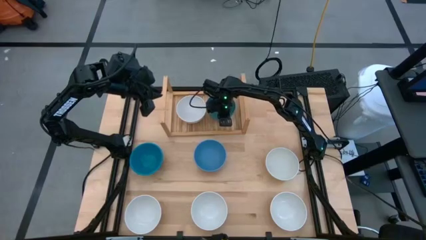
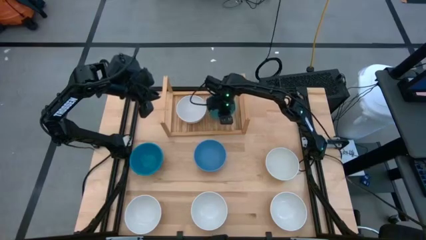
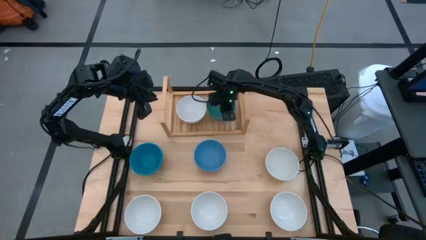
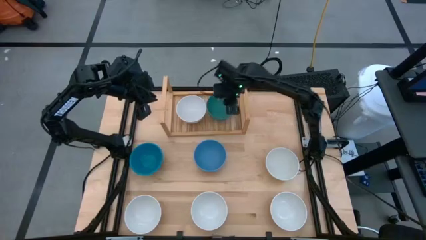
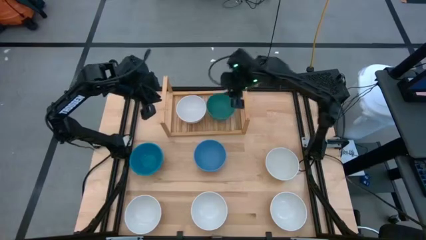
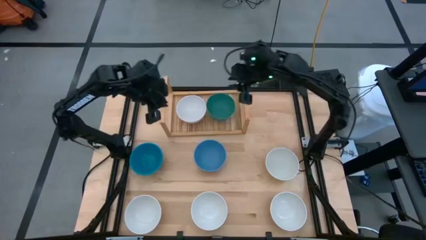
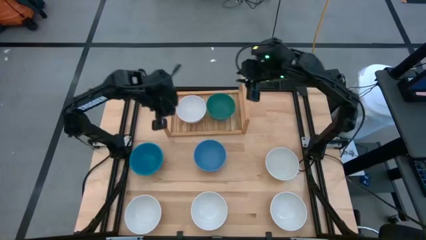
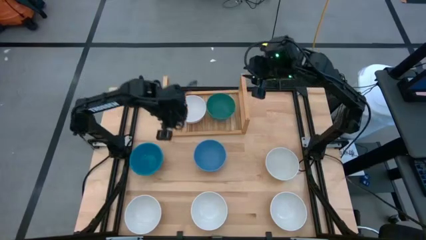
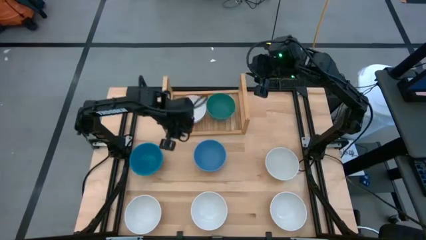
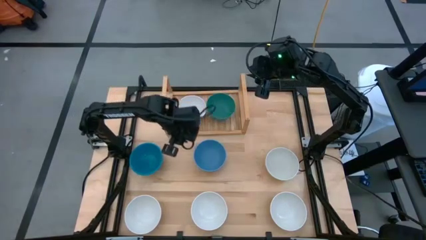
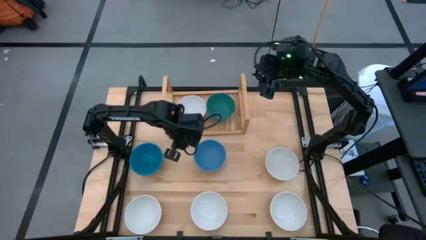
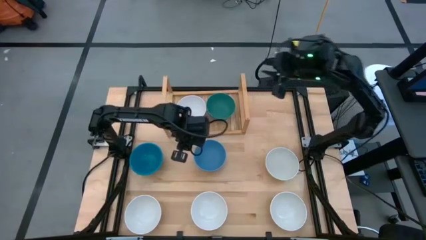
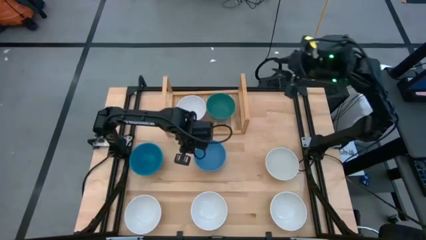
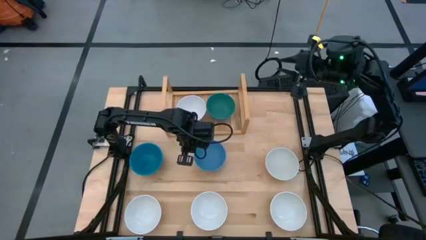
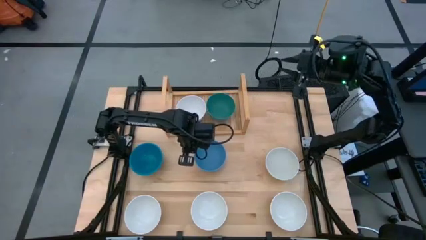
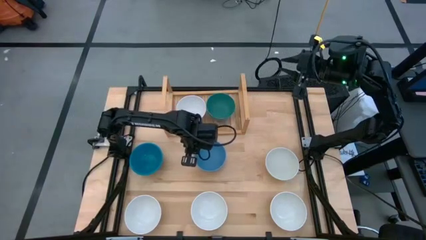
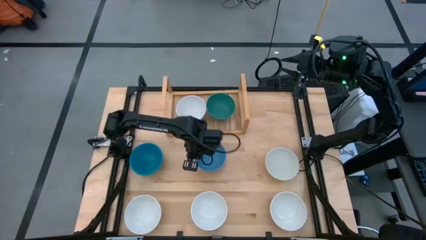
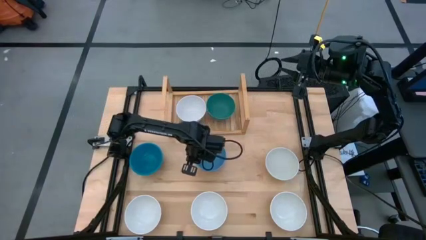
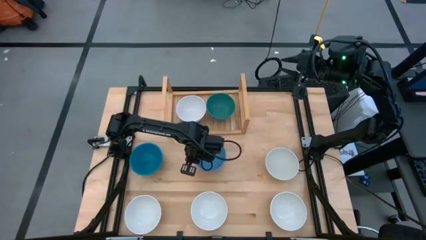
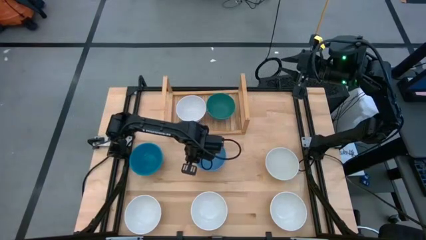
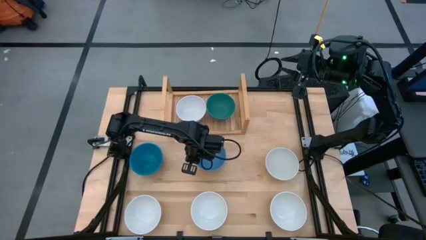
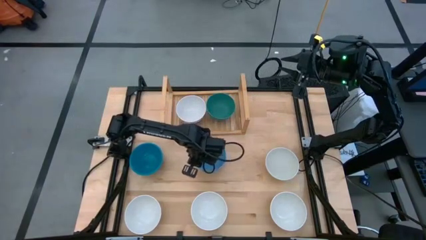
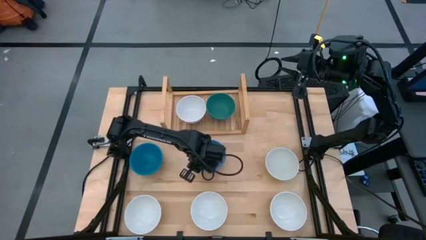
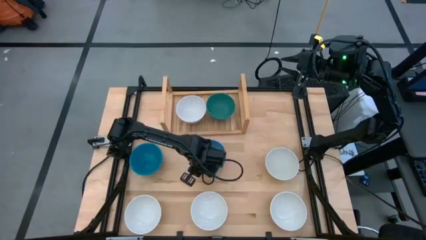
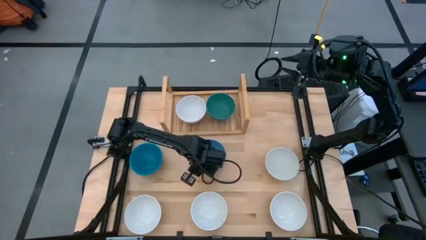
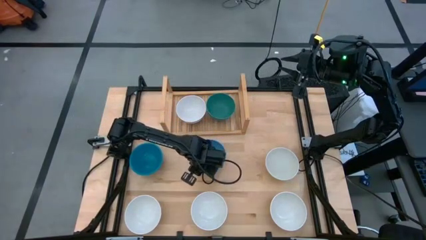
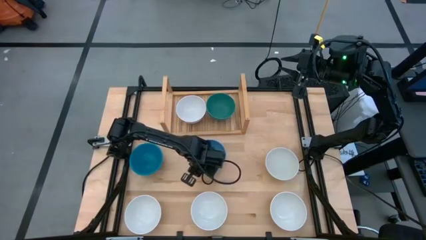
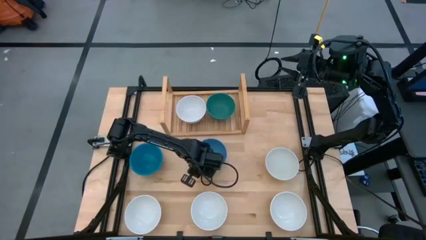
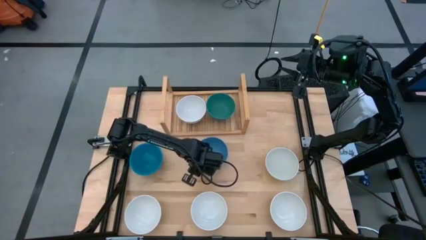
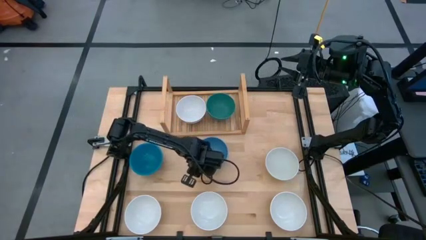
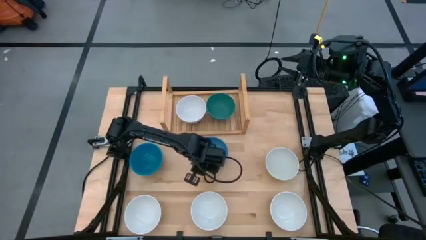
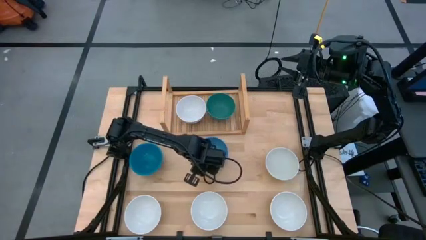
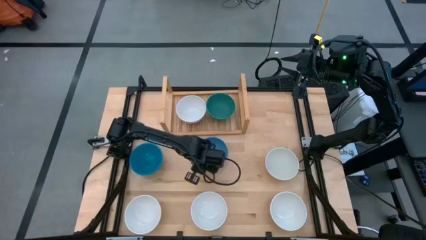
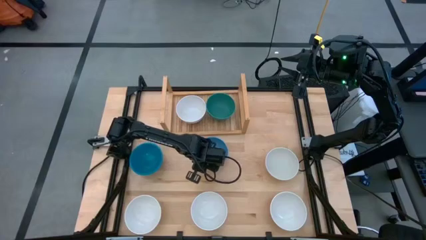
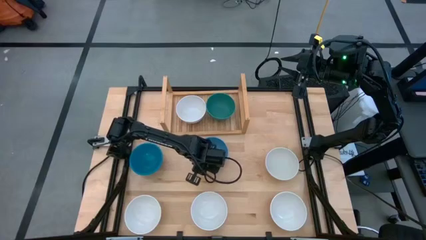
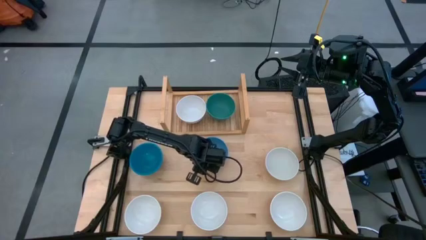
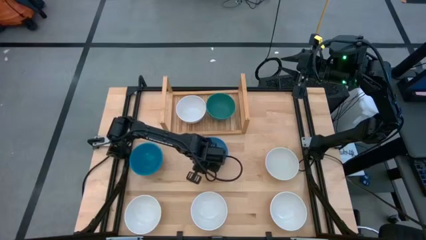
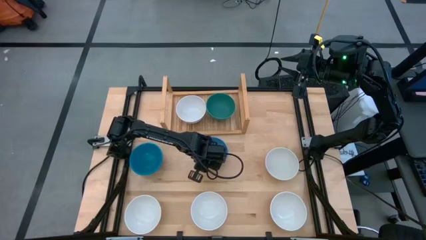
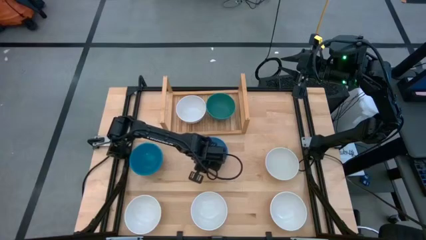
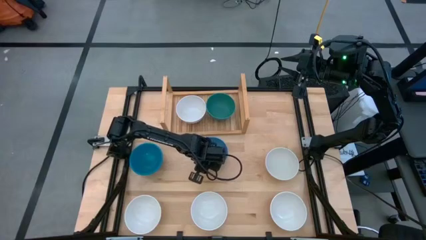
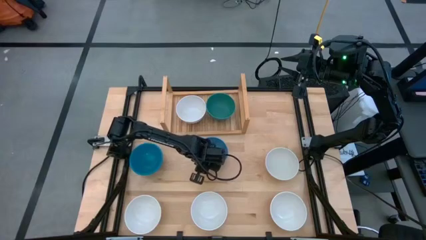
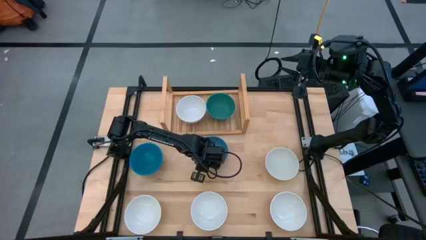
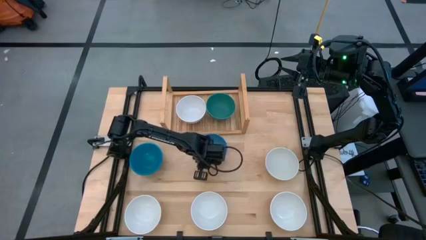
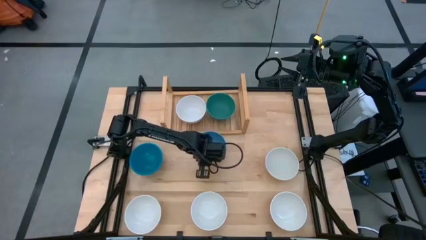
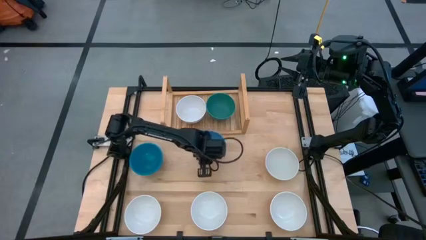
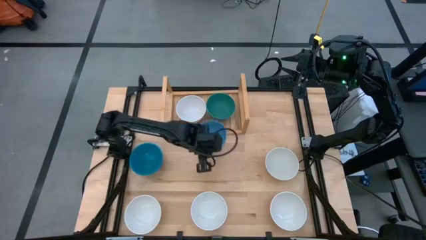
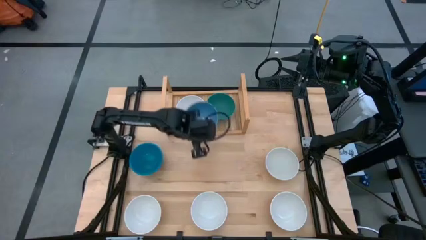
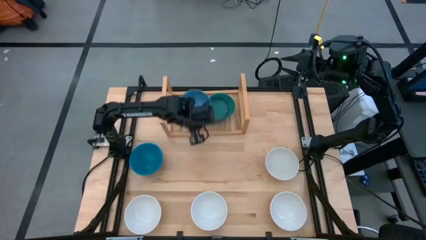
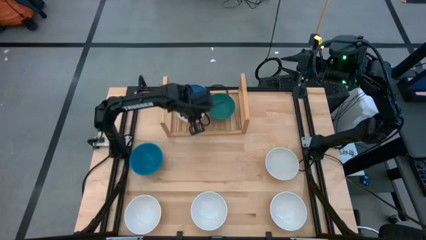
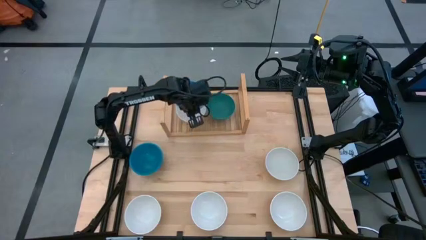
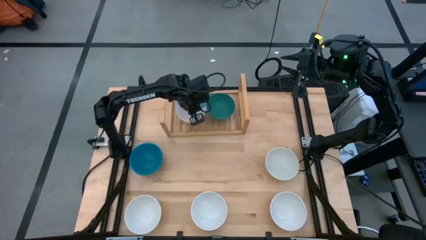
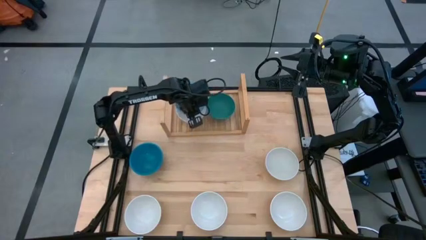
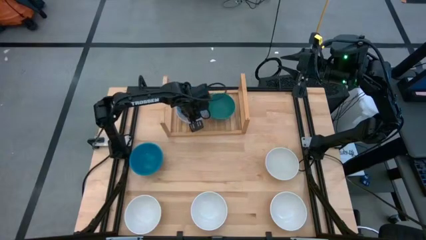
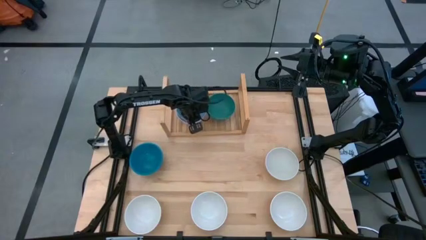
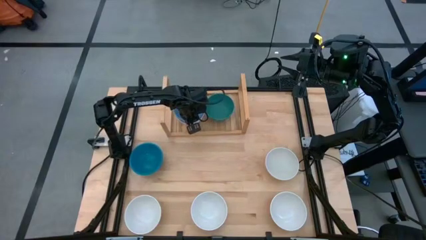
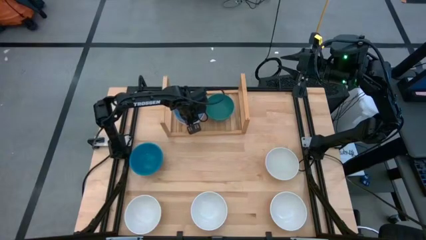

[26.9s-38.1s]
Task: Place and stack bowls onto a shelf
Stack the blue bowl on the white bowl on the shelf

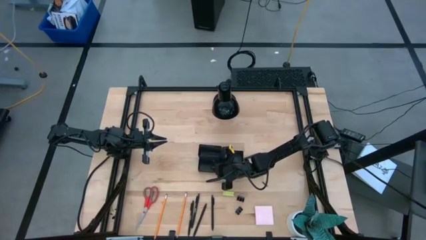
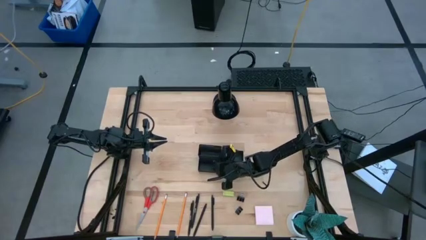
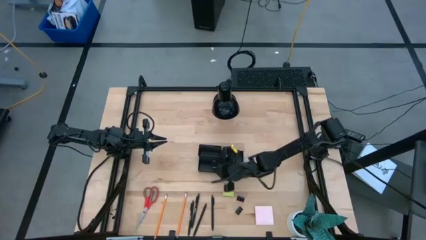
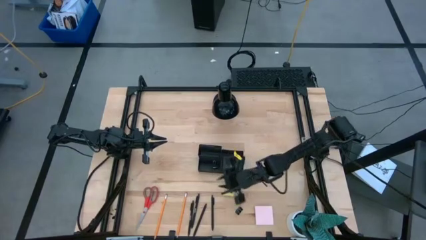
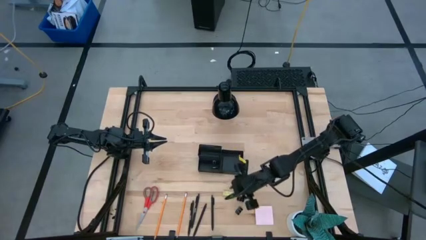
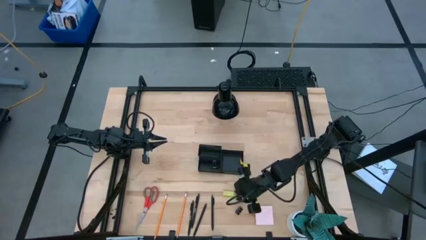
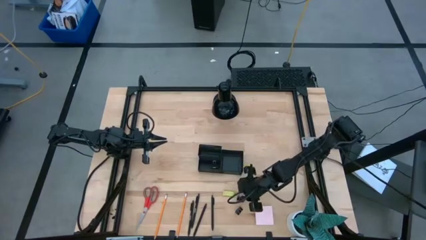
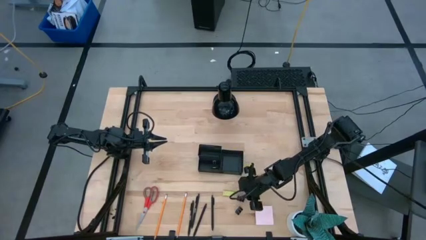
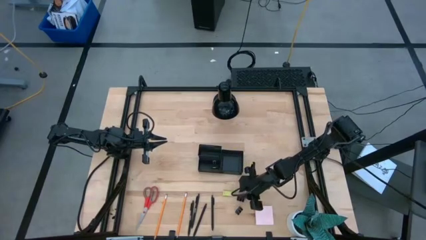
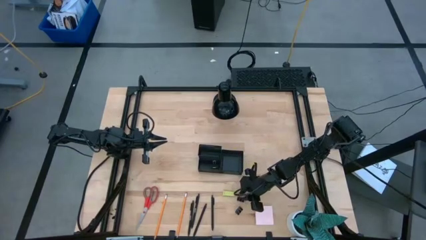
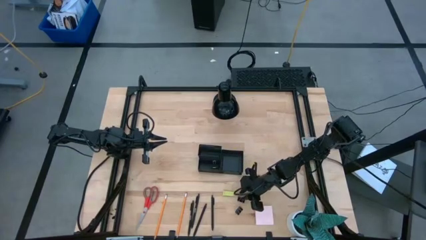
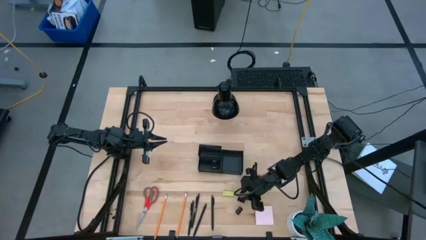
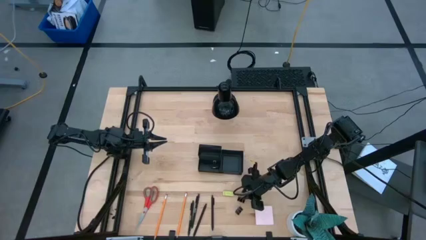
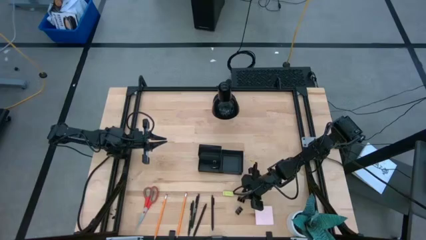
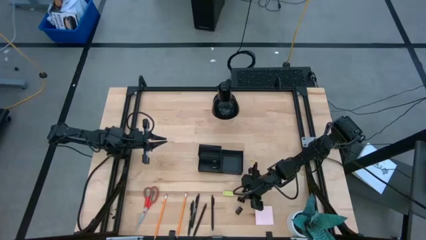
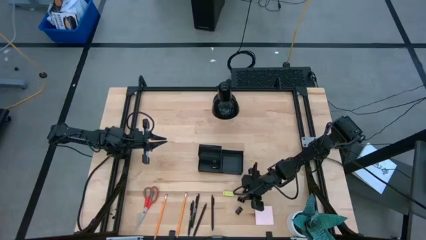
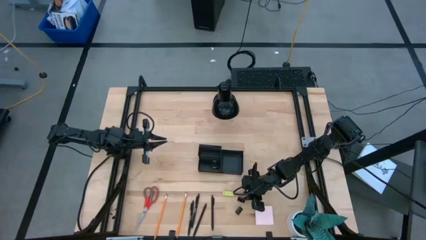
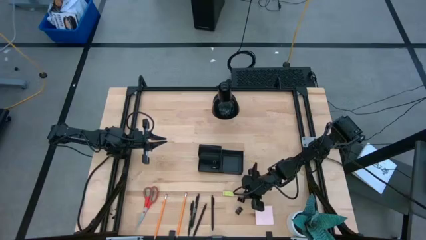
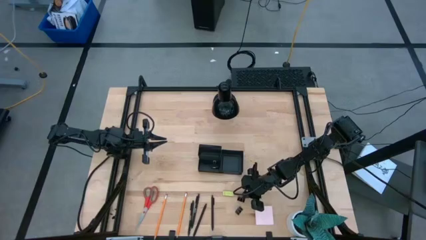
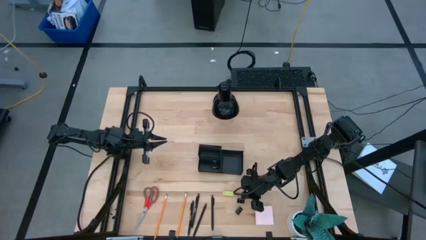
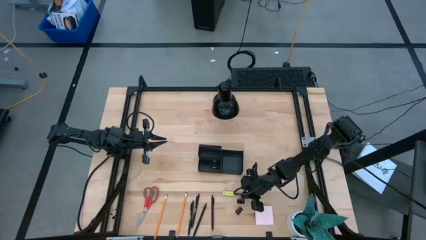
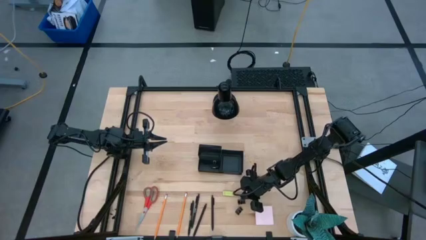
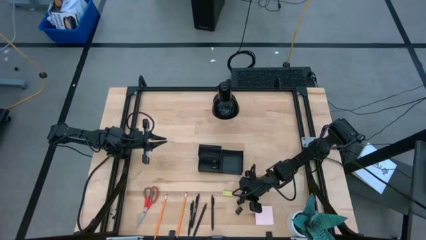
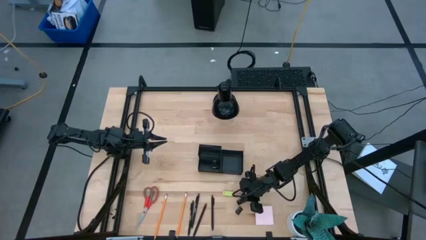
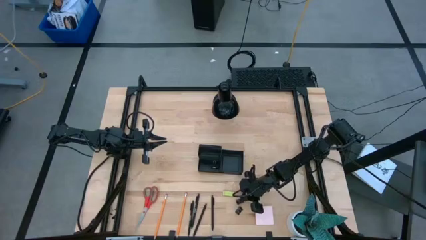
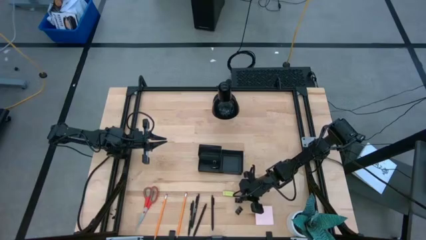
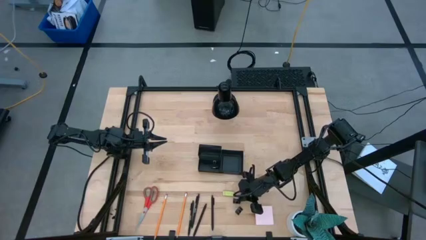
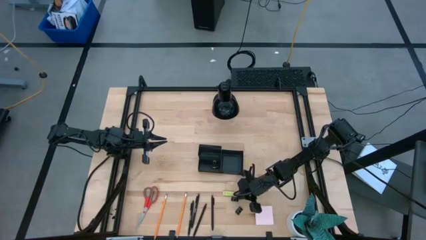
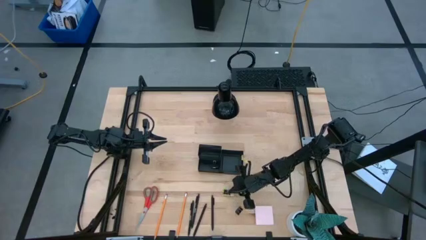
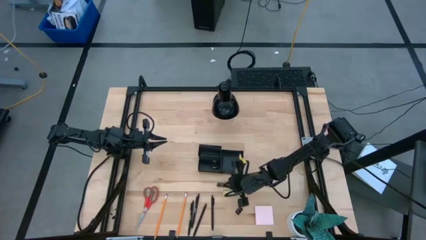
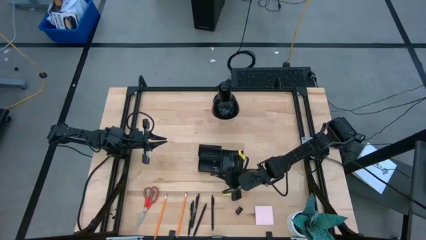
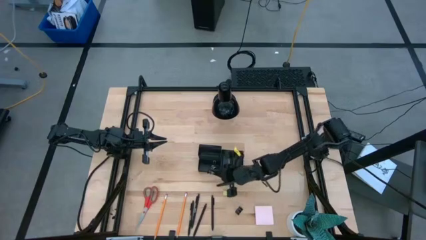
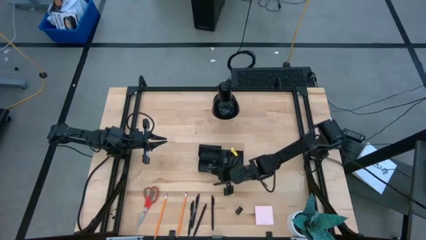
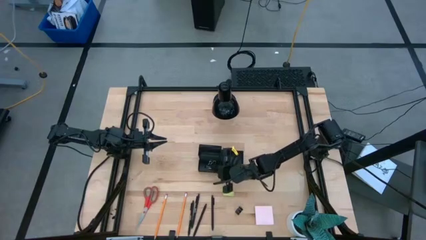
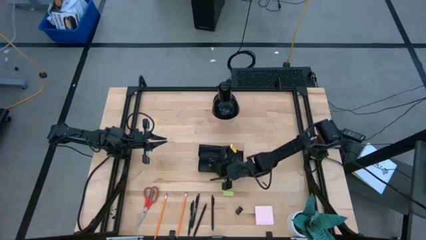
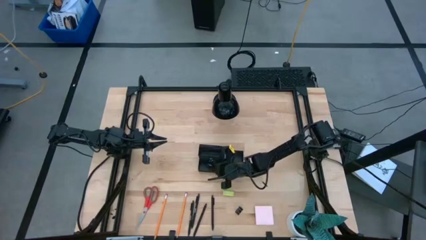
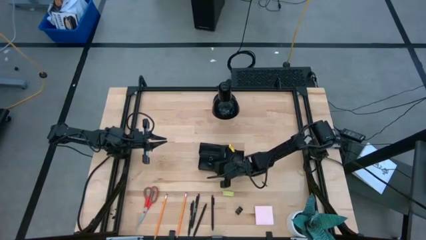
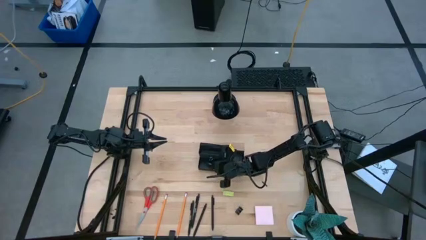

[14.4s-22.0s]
Task: Pick and place office supplies into organizer
Put the top binder clip into the bottom left section of the desk organizer
